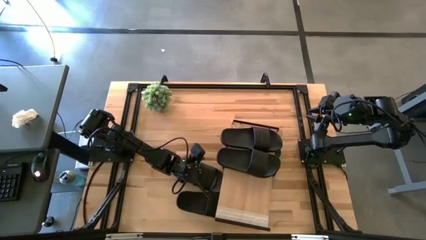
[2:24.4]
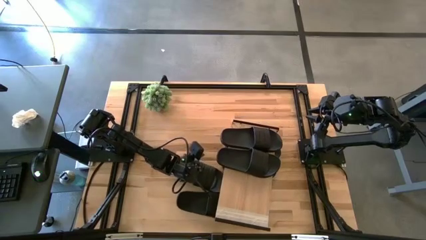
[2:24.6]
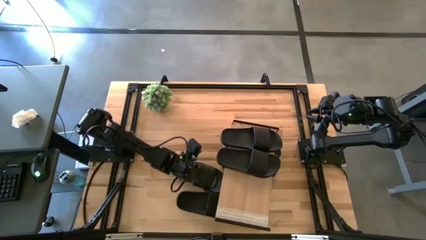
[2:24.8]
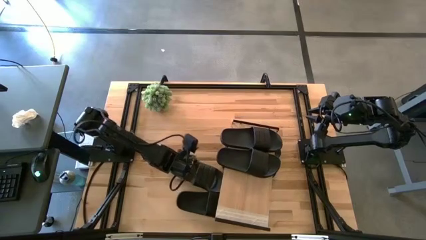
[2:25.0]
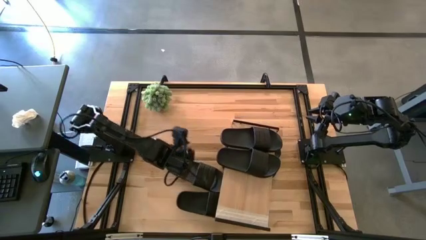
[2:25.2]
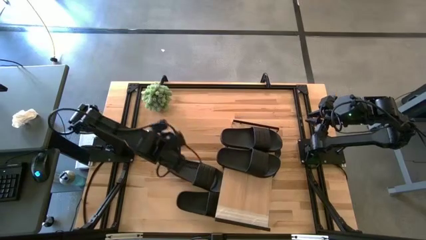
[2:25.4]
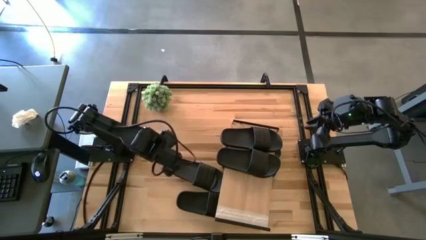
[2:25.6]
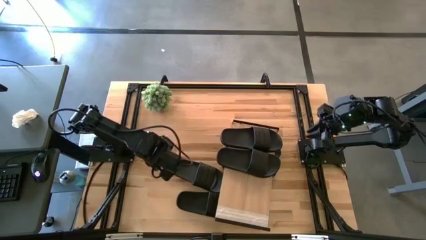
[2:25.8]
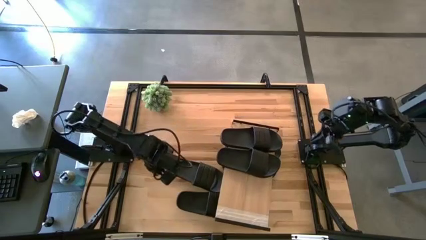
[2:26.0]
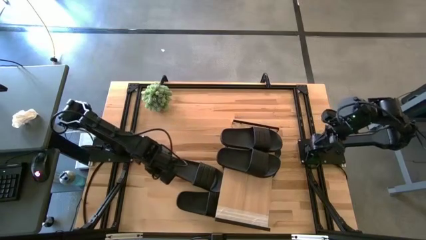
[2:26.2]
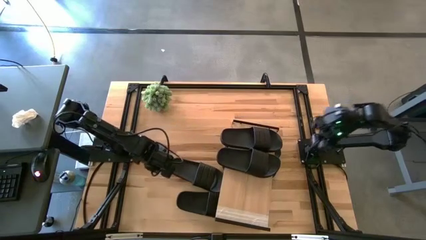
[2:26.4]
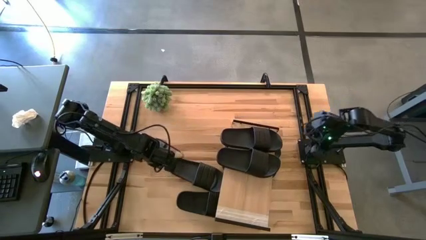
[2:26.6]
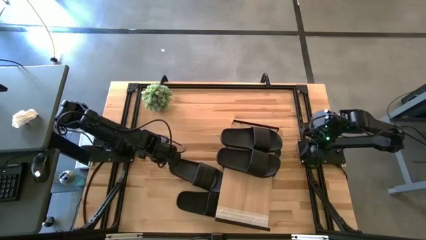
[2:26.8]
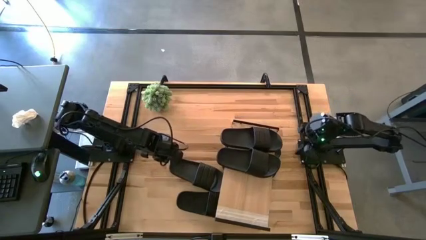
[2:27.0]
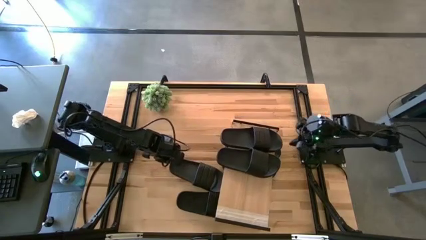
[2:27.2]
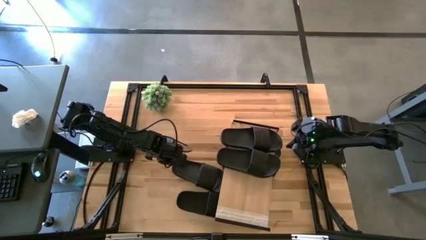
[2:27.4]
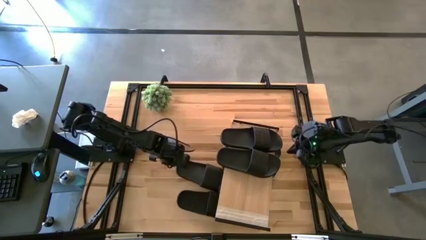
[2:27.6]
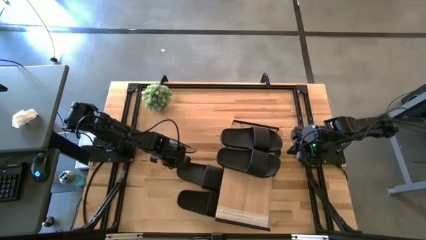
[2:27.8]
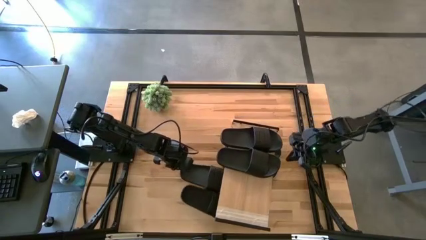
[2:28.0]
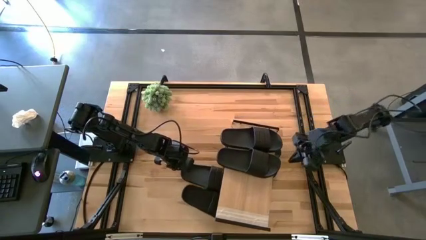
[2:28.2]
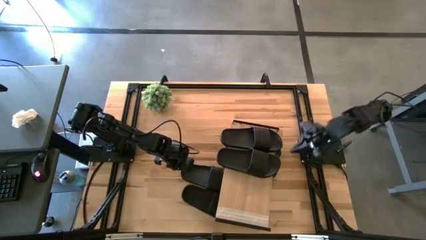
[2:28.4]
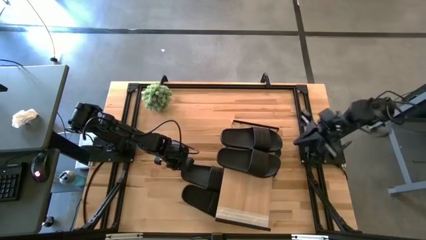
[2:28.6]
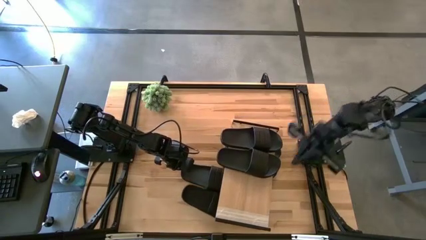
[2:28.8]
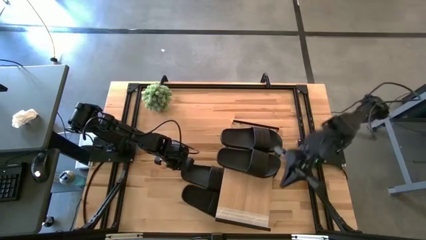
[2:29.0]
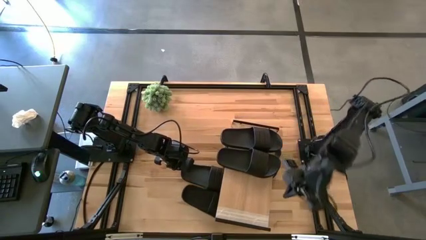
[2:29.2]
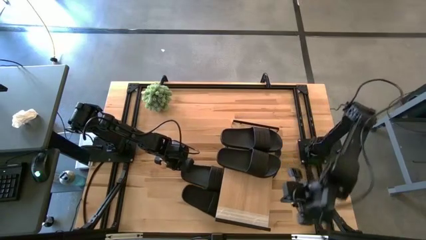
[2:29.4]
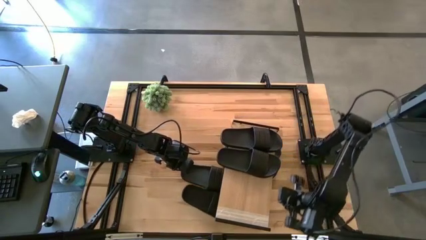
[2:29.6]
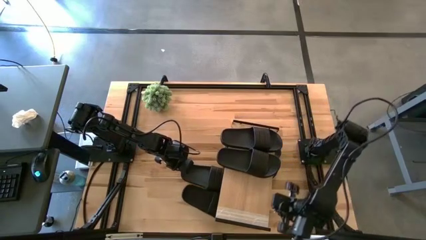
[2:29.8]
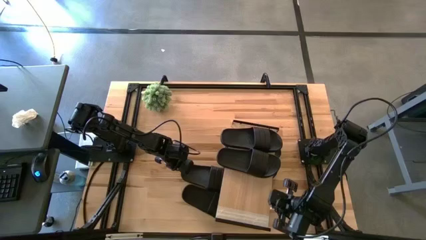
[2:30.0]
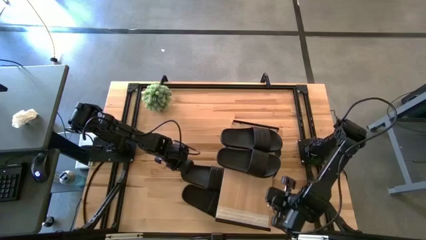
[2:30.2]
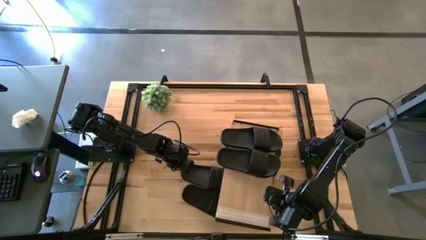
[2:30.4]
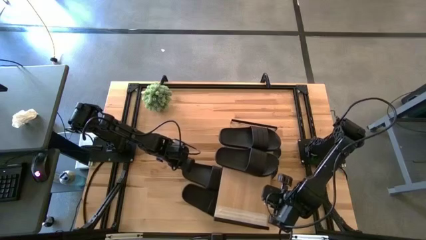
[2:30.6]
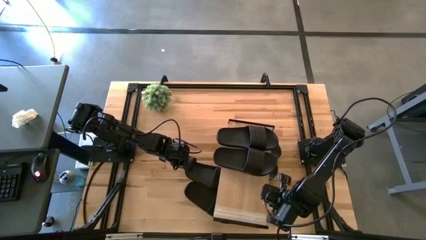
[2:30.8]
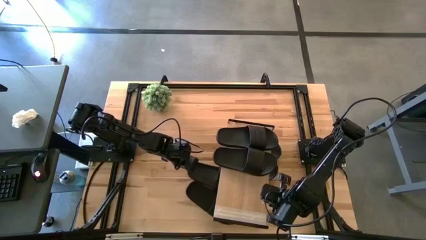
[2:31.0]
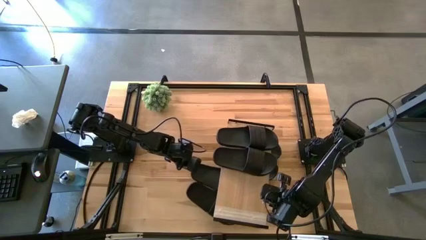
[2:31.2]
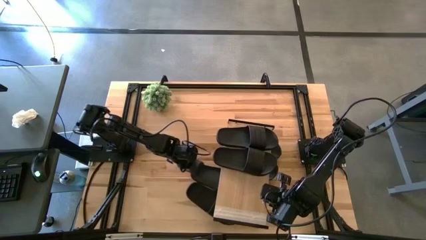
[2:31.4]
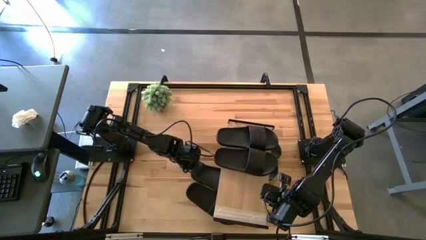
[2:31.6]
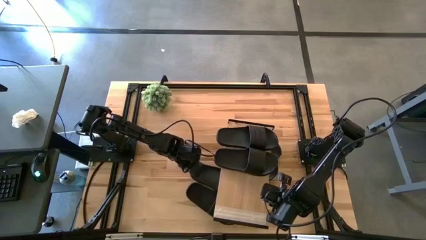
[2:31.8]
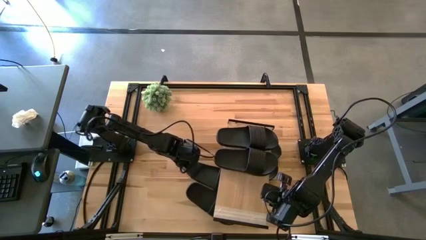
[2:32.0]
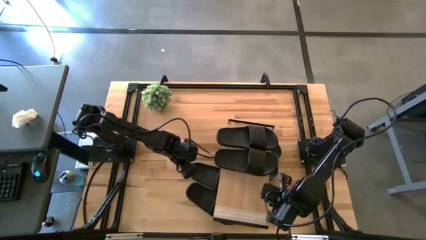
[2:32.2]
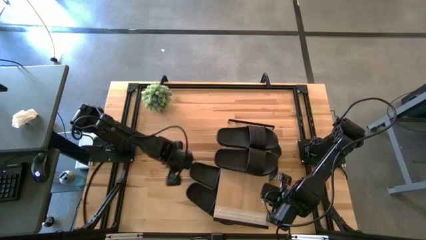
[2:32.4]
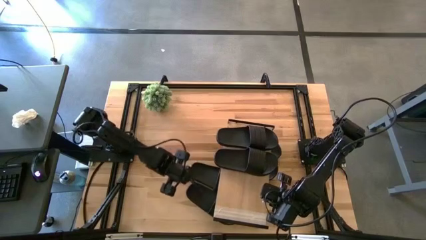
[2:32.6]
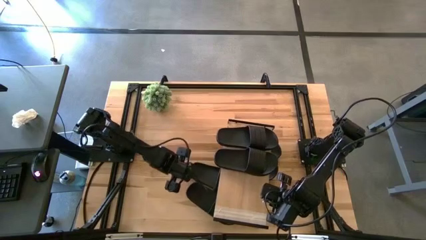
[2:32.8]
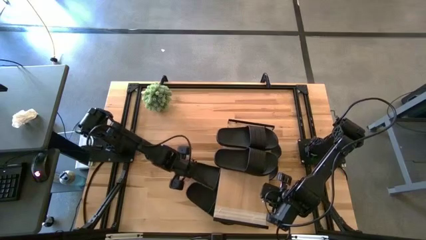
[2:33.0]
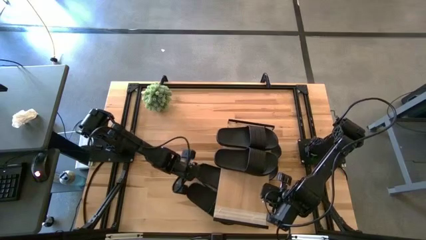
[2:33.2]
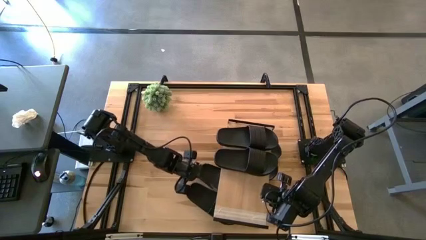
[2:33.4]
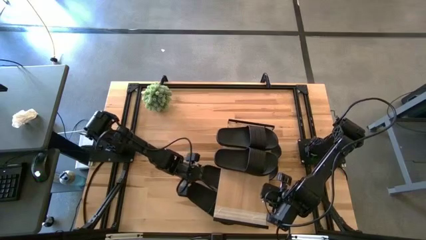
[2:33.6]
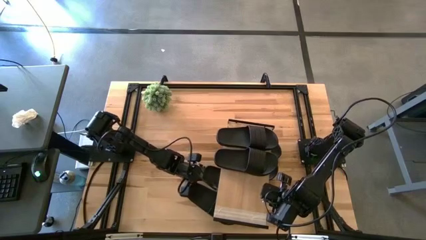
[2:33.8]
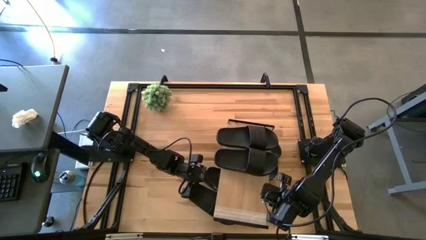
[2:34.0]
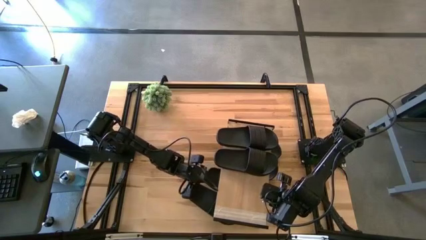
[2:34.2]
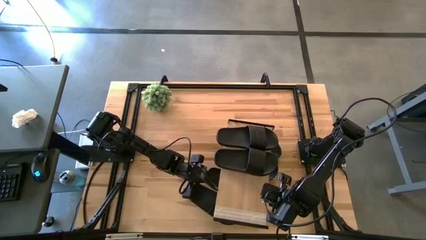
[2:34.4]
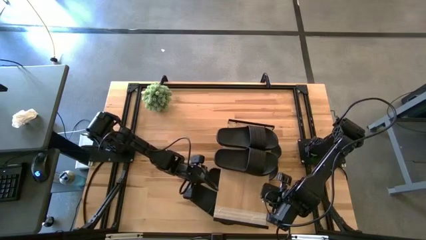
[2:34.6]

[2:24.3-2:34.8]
Task: Pick and place slides into the shelf
Put the black slide under the shelf

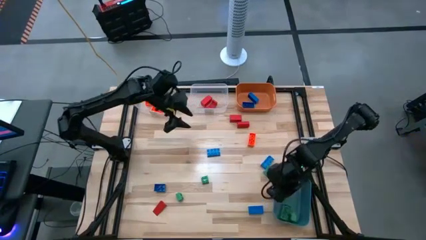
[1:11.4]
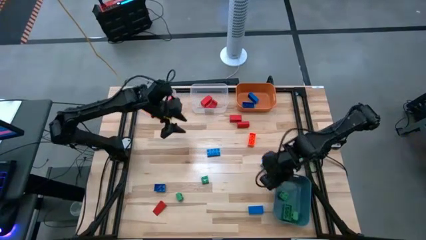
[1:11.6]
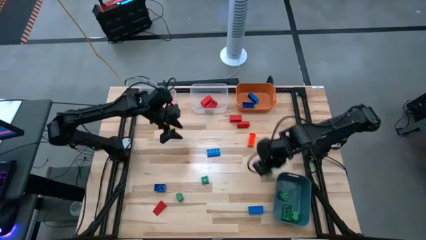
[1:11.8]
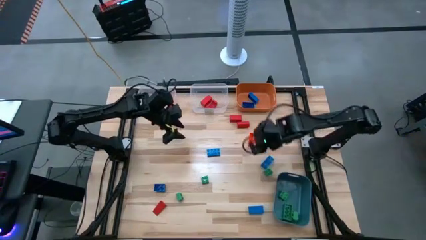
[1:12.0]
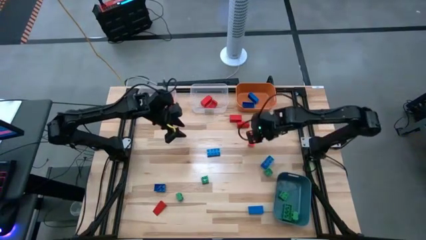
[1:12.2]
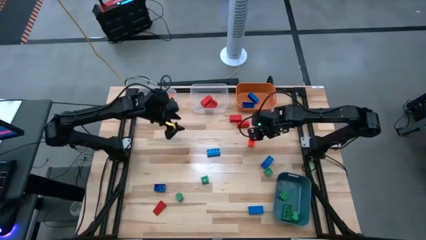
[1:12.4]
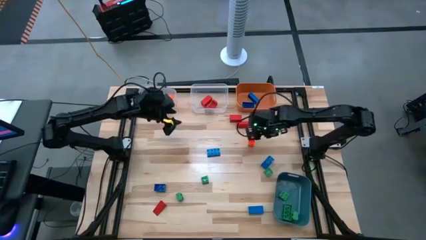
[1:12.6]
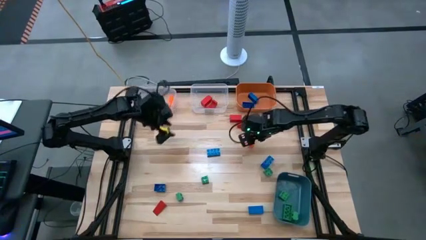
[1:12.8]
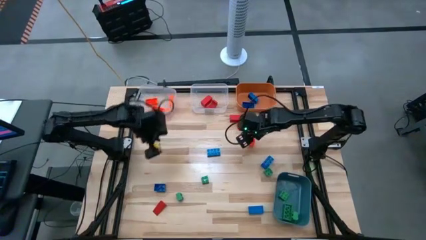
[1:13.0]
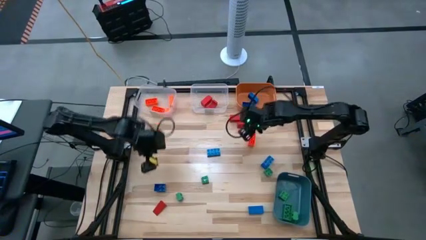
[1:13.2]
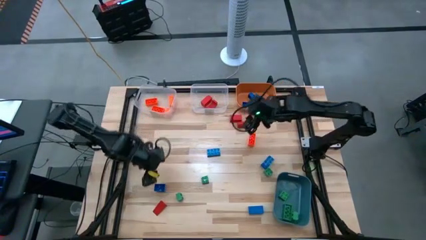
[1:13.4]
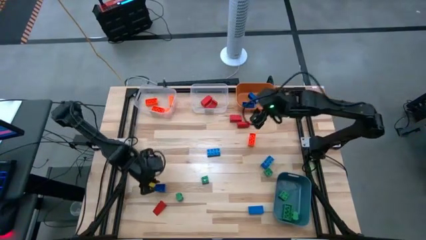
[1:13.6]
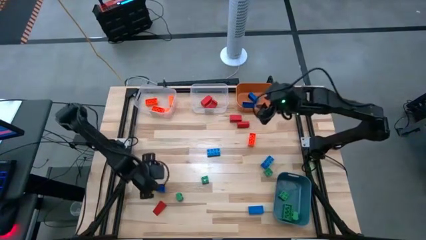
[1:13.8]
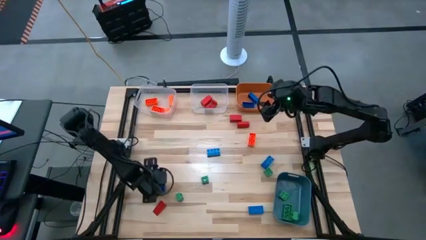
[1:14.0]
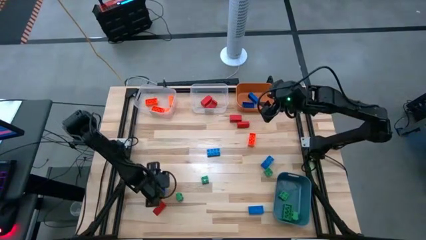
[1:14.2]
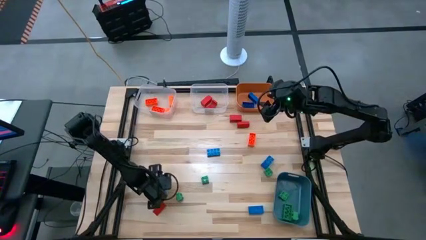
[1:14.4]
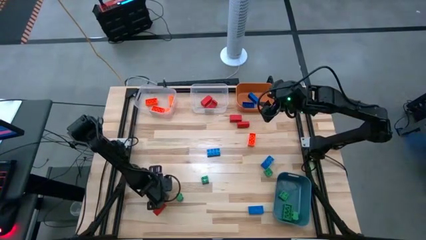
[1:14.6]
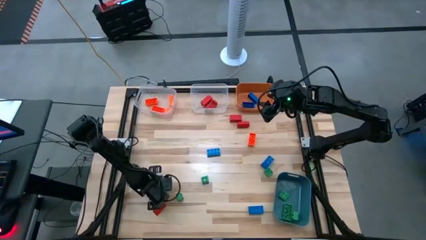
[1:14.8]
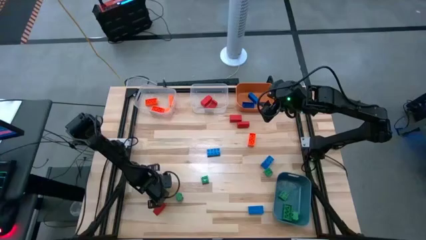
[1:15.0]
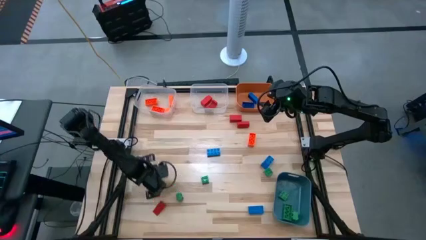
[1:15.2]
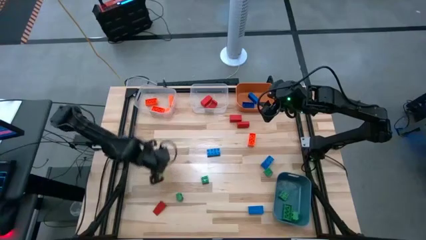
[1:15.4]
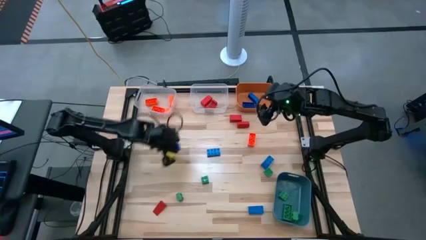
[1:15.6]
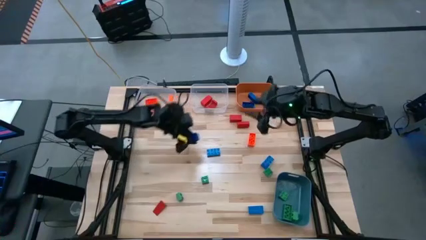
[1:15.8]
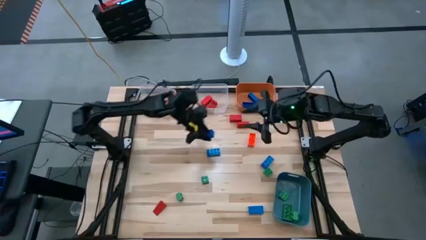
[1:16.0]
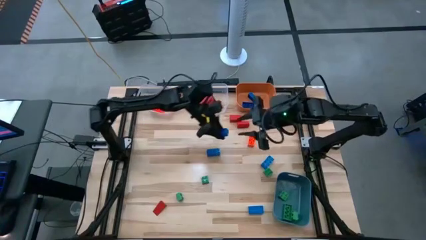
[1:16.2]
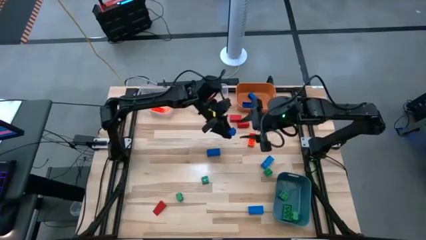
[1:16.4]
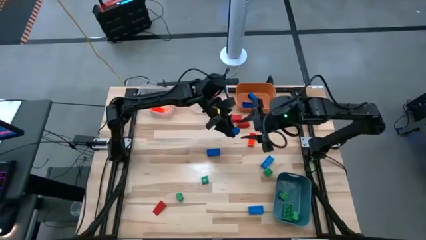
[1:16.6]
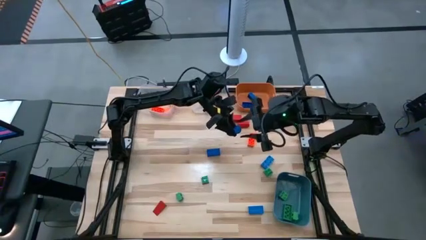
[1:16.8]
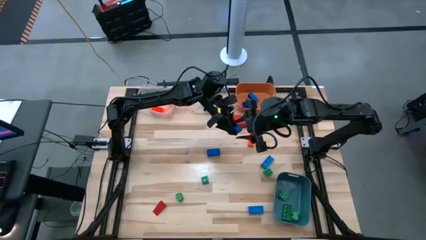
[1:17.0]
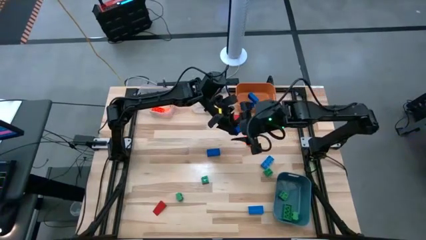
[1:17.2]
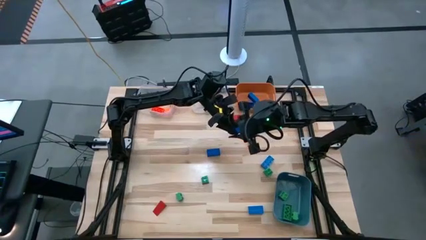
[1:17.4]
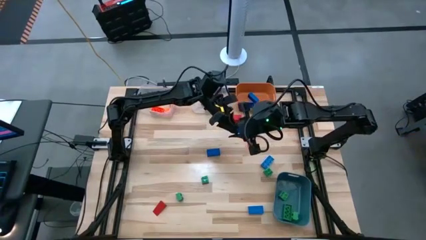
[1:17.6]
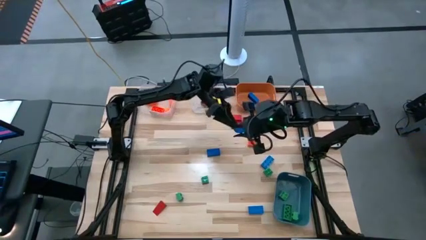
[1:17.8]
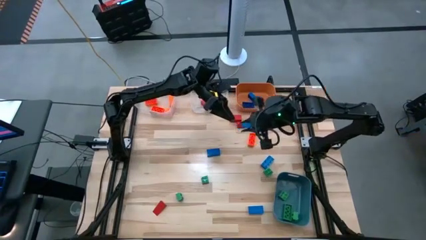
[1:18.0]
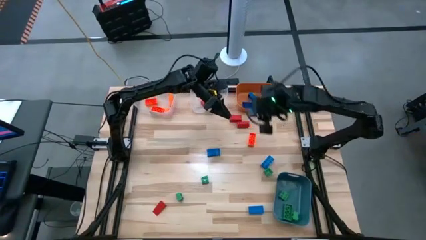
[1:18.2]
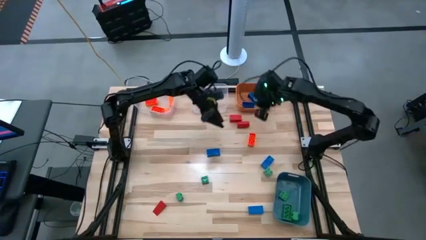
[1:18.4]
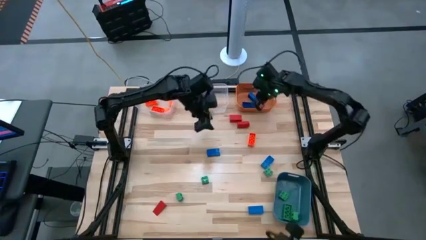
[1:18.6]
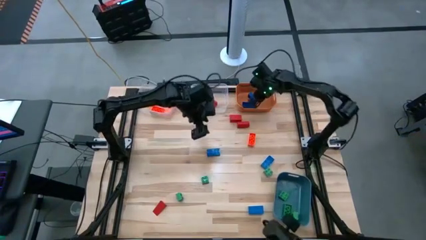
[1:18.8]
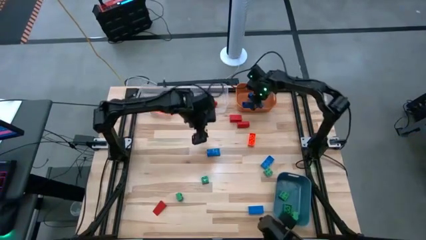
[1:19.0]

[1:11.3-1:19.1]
Task: Sort blocks
Put the blue game piece into the orange bin
